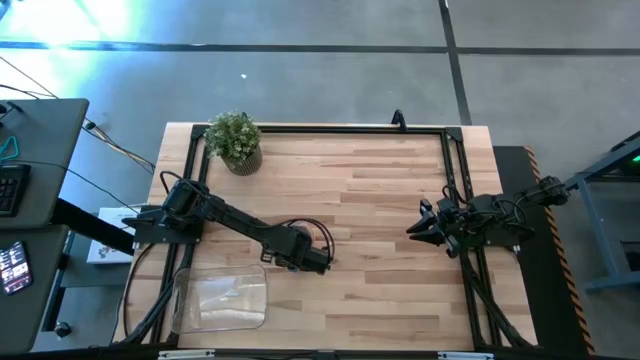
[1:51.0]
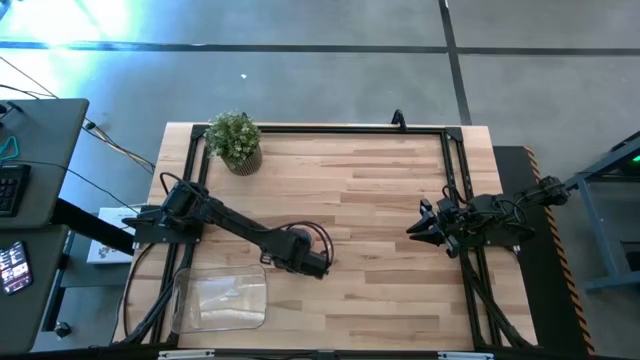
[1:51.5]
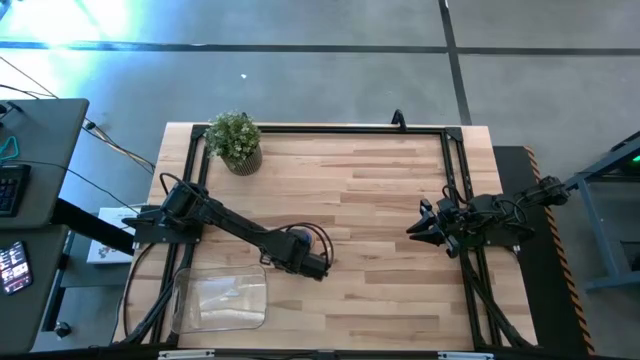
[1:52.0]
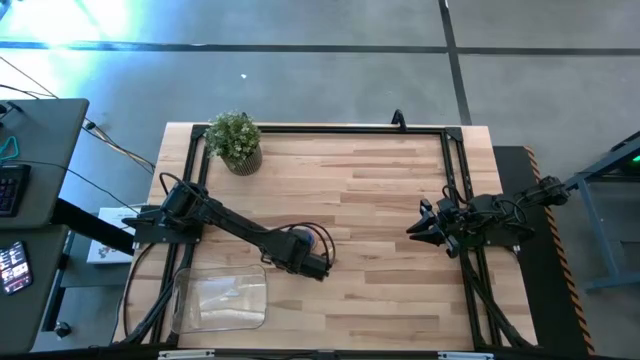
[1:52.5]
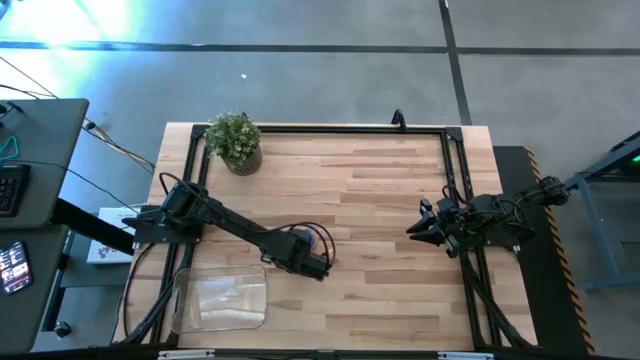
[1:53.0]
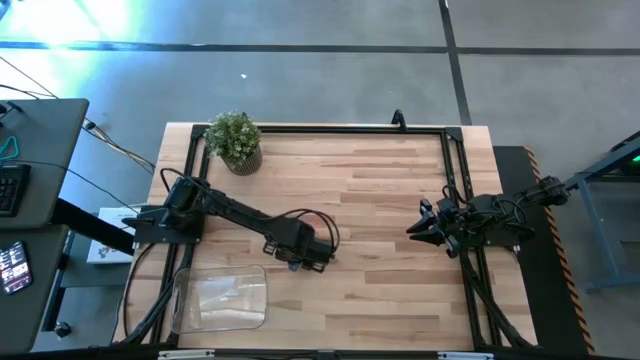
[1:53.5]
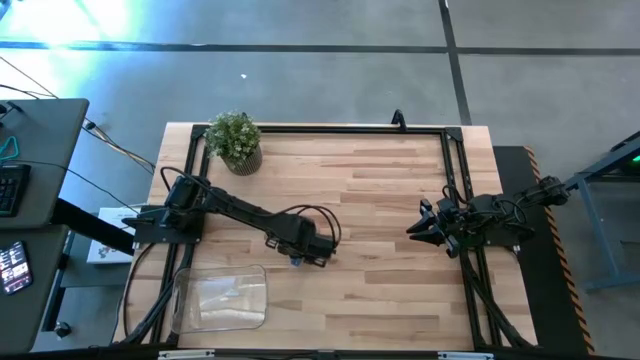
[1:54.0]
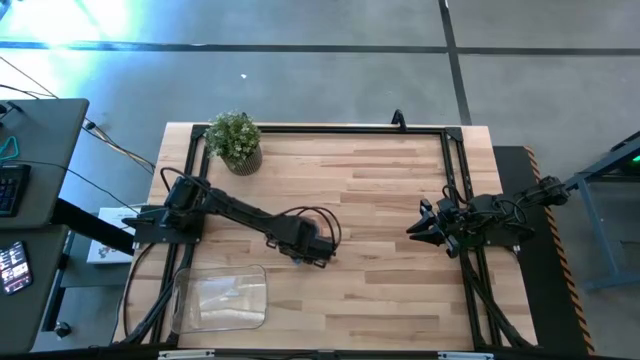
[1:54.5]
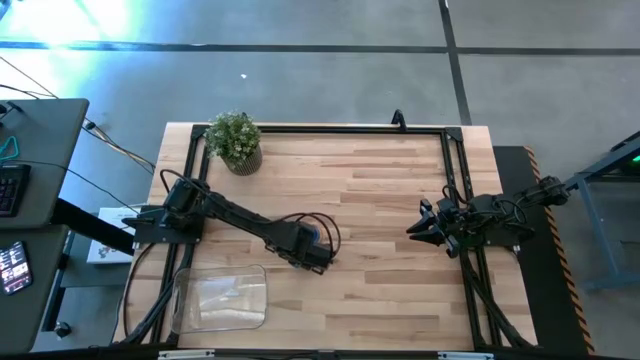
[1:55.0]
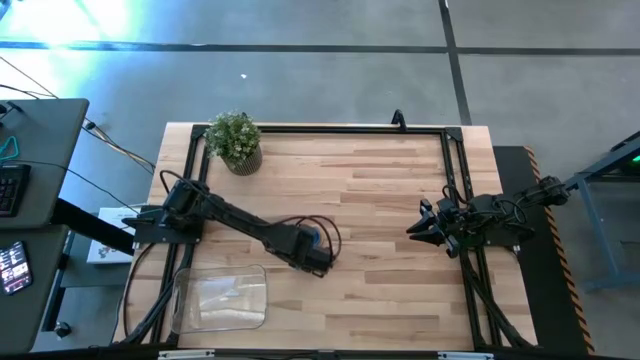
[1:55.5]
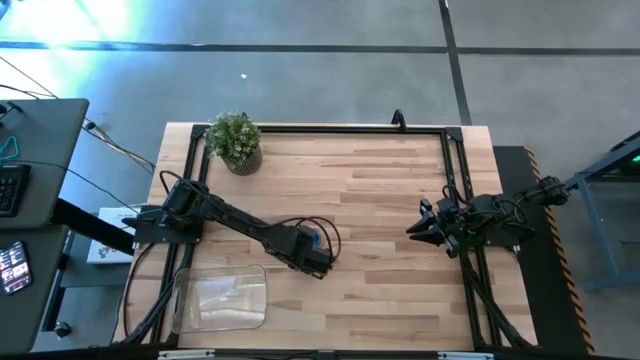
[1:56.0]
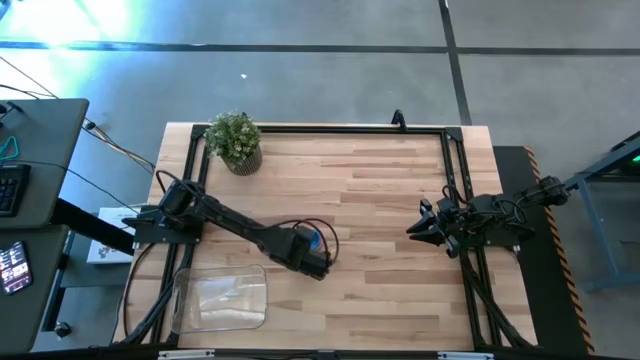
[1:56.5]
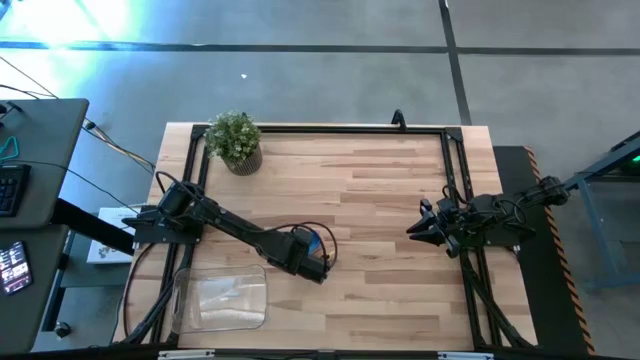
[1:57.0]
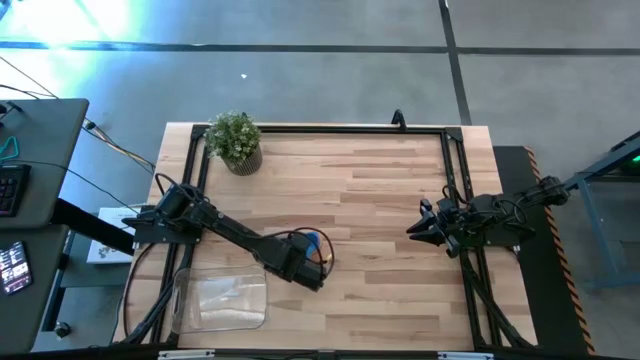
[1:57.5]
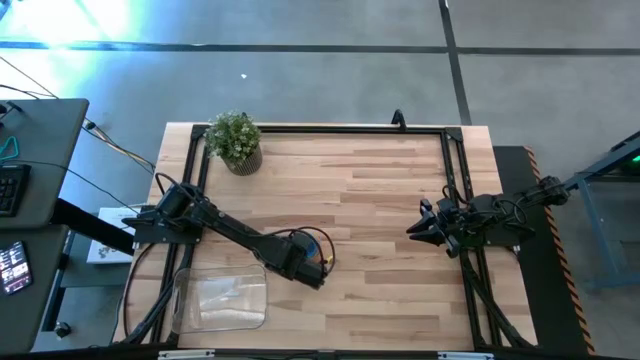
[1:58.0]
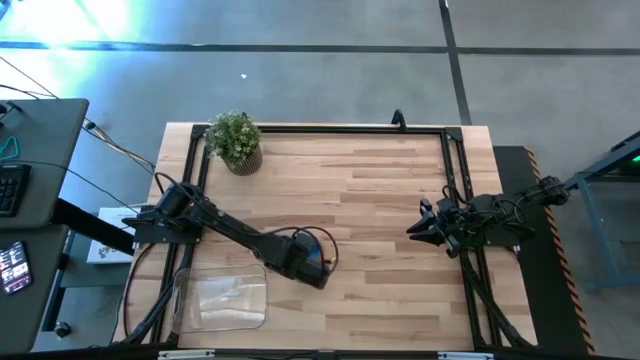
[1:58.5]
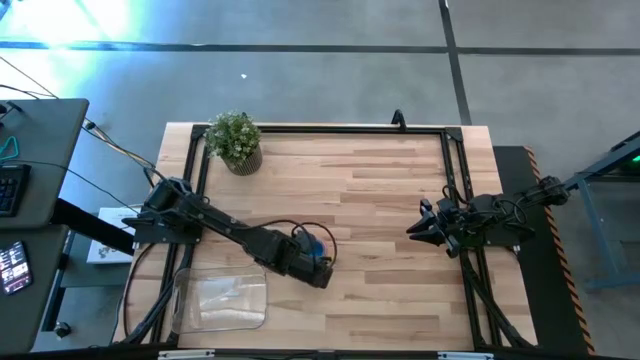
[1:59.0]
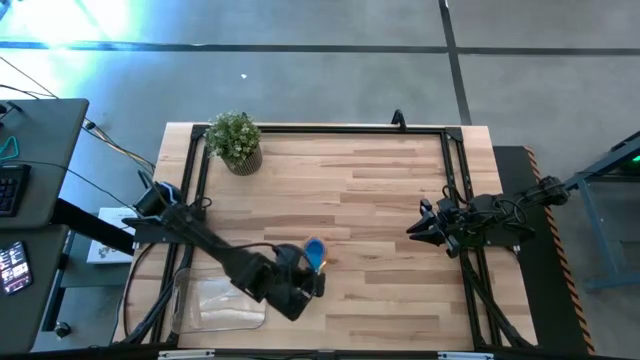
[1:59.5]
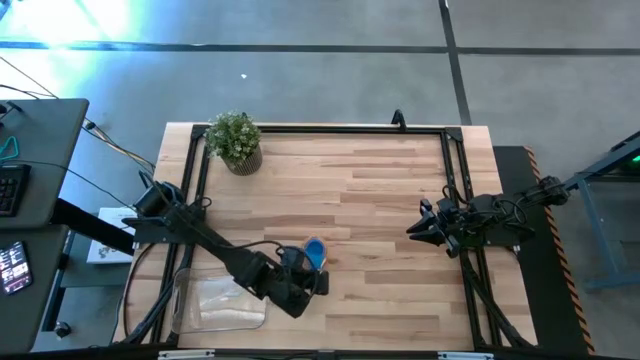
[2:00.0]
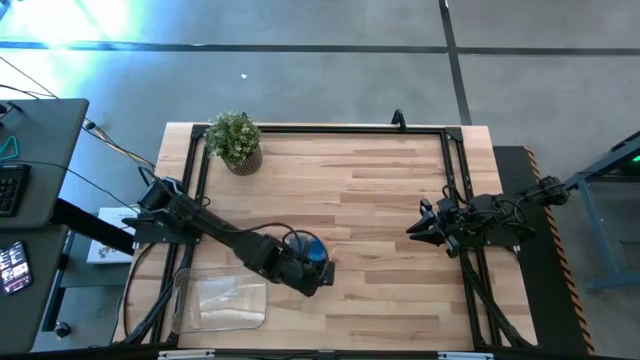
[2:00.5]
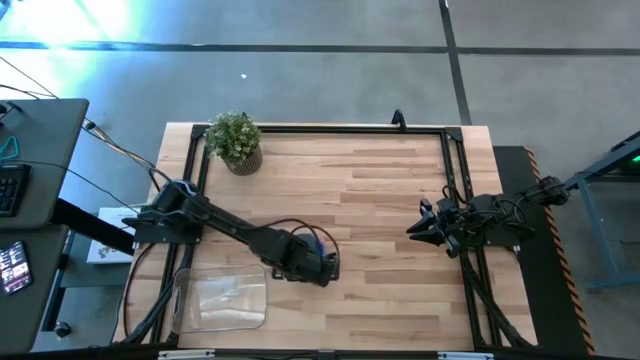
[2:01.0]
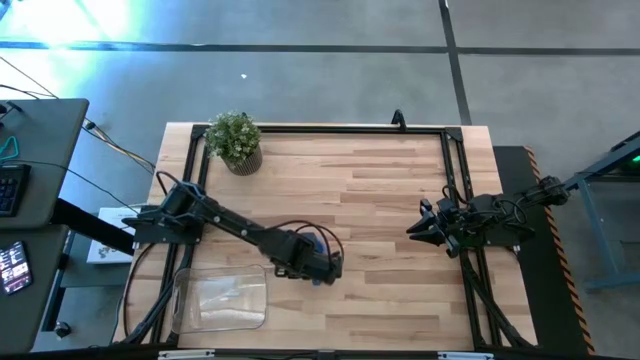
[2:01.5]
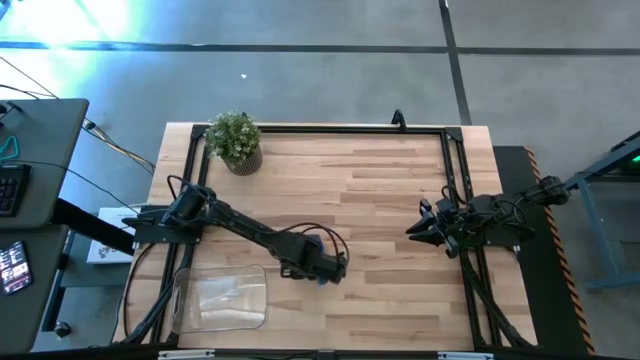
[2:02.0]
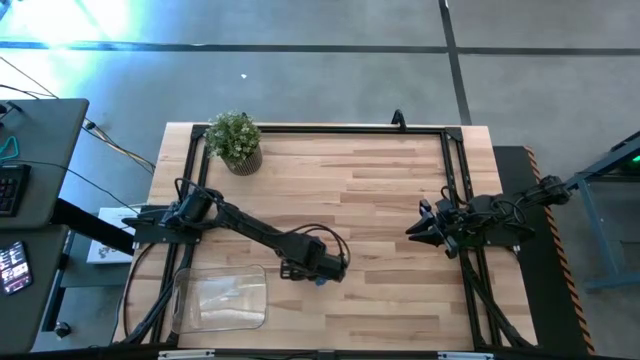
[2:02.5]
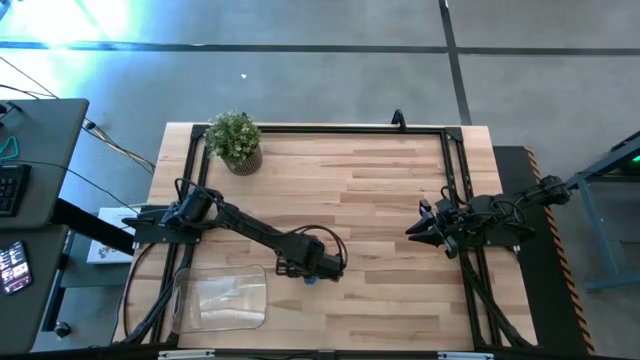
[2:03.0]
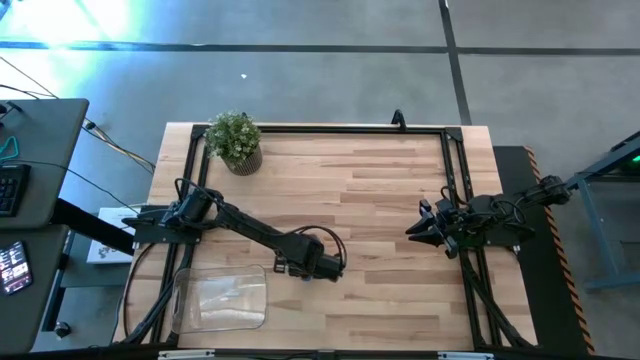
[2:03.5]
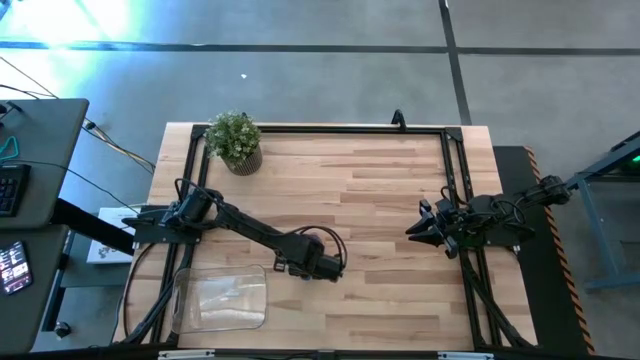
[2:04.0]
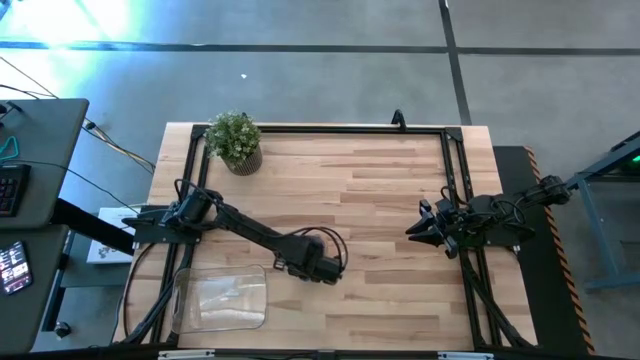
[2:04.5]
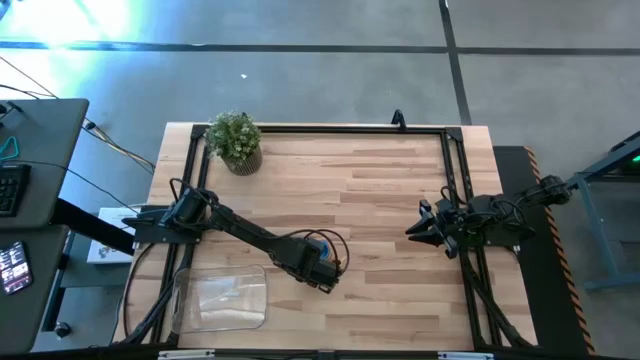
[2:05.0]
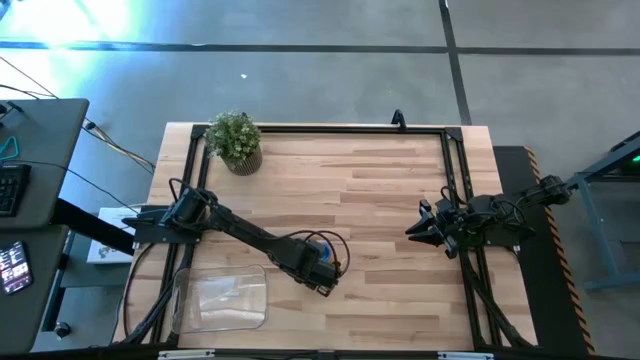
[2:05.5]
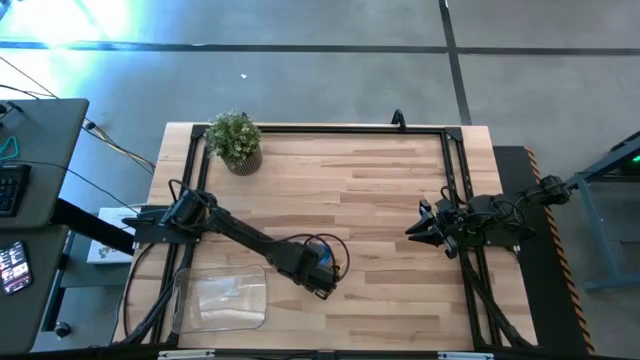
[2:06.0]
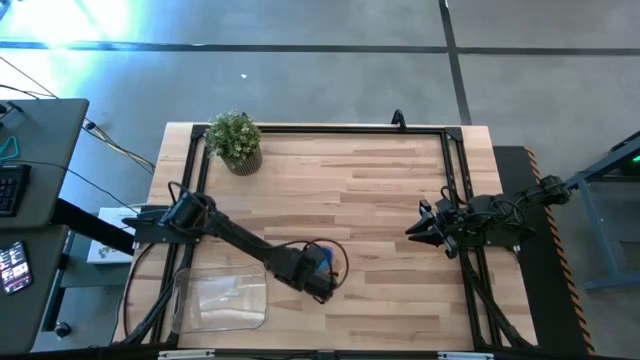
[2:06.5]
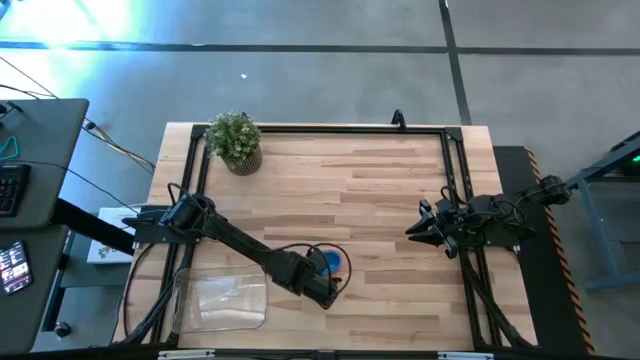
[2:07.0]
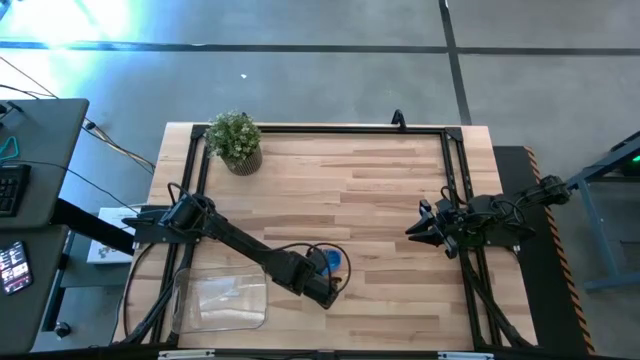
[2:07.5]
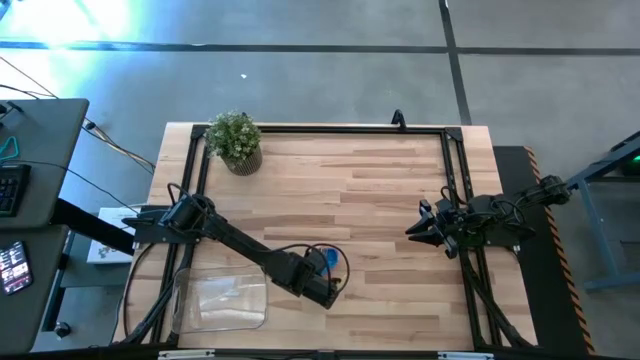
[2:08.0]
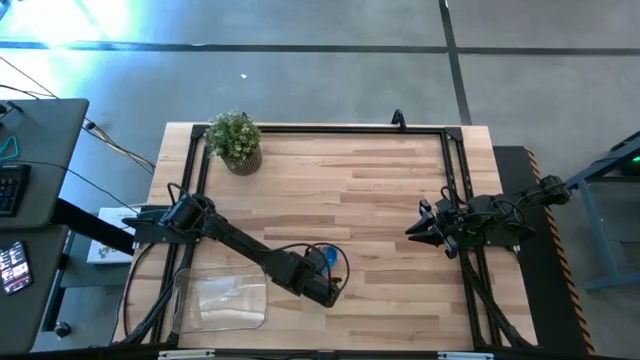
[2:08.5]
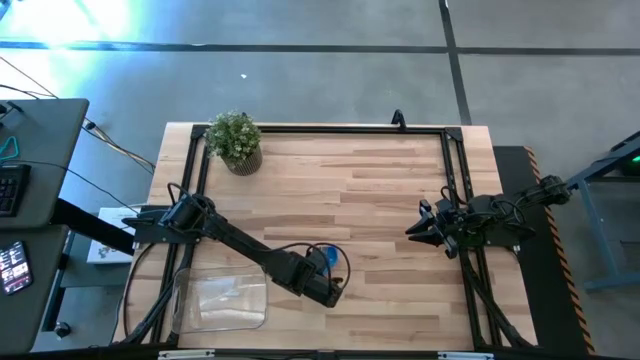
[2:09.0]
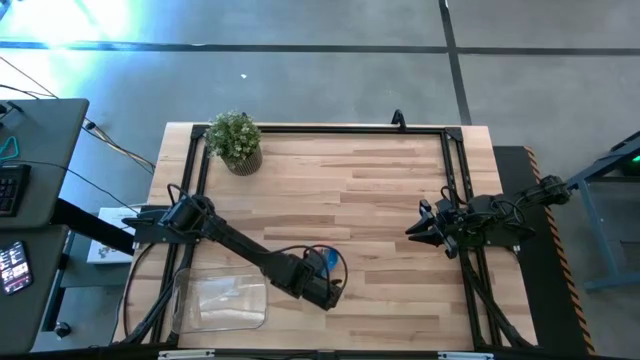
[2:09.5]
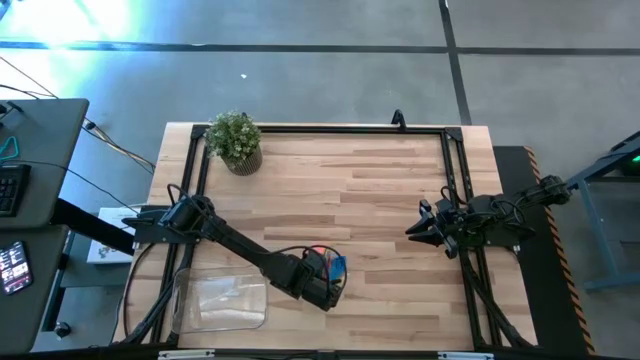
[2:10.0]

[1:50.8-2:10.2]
Task: Nest measuring cups in basket
Put the nested measuring cups into the transparent bin

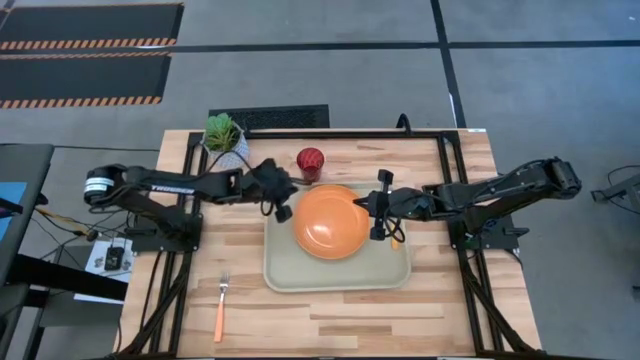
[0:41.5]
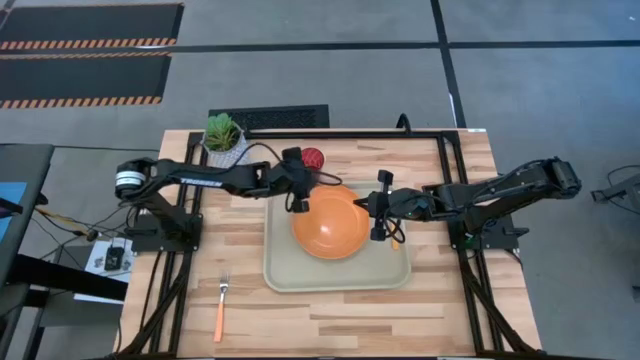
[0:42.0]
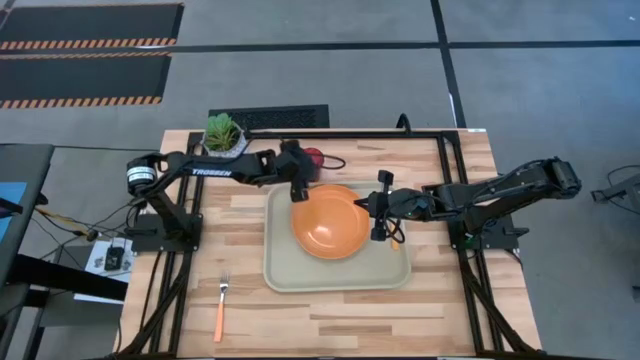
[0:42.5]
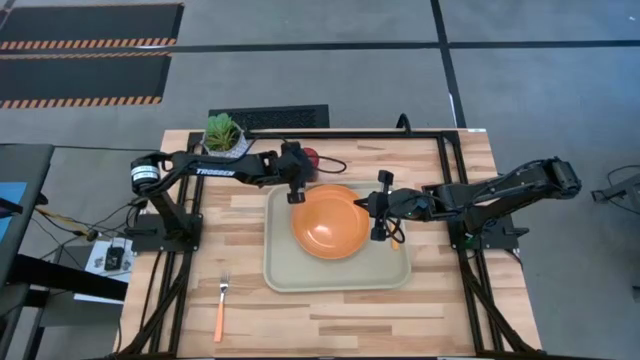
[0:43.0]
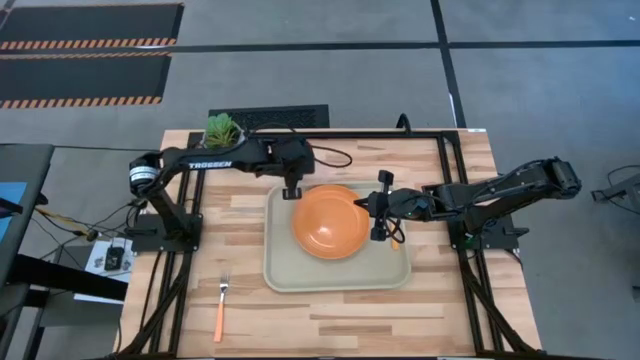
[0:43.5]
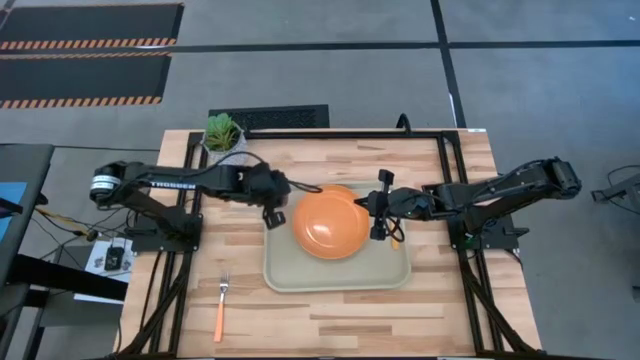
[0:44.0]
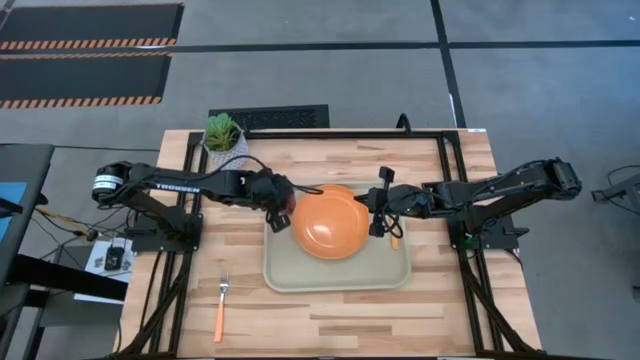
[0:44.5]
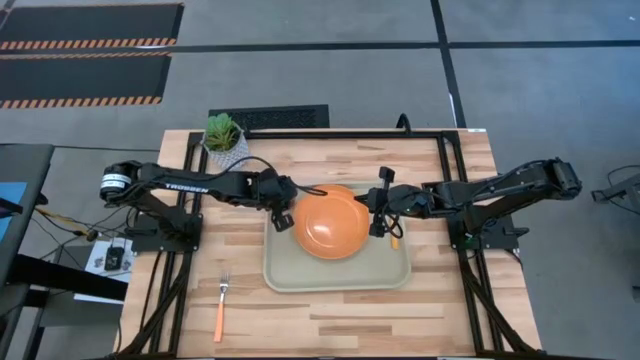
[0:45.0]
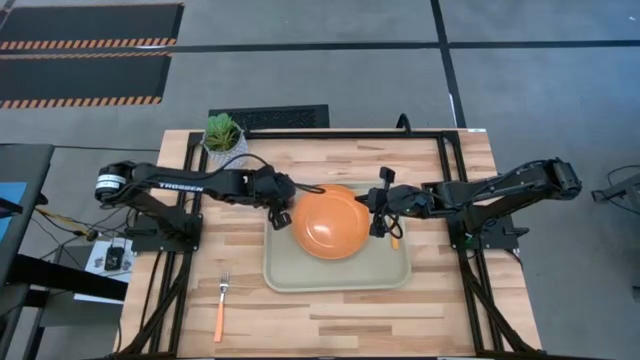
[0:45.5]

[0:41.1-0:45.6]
Task: Pick and place plate/cup/fork/spoon on tray
Put the red cup on the gray serving tray to the top left of the orange plate
